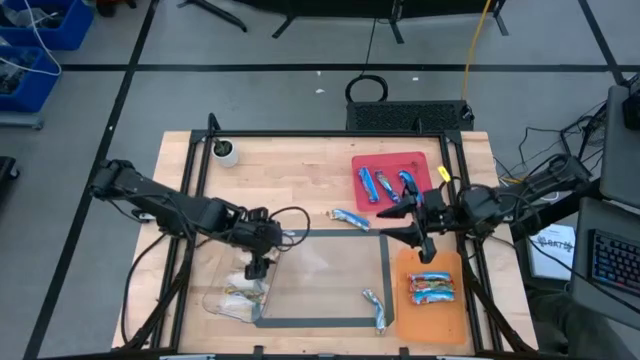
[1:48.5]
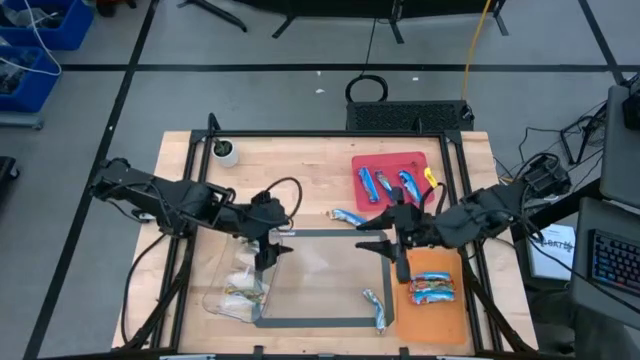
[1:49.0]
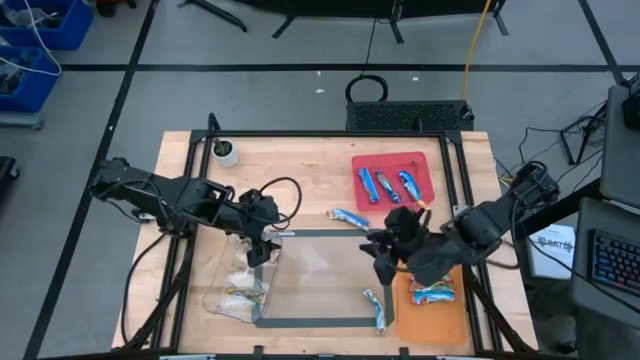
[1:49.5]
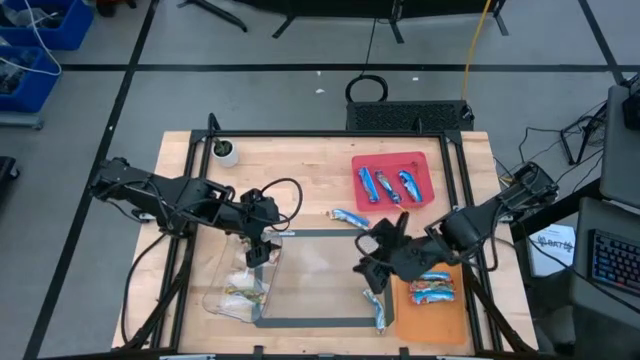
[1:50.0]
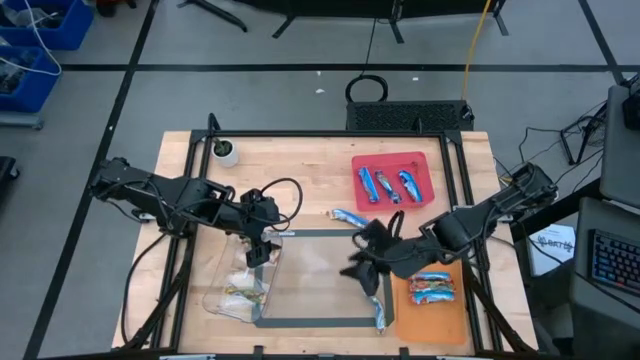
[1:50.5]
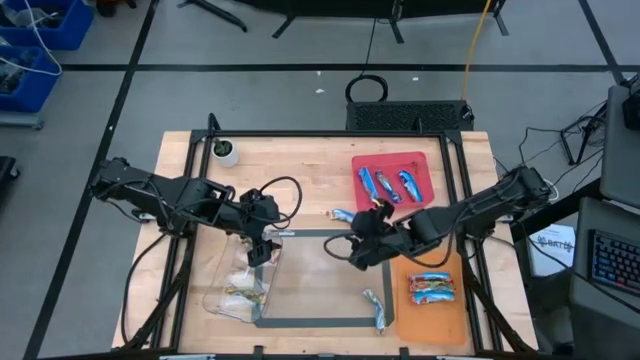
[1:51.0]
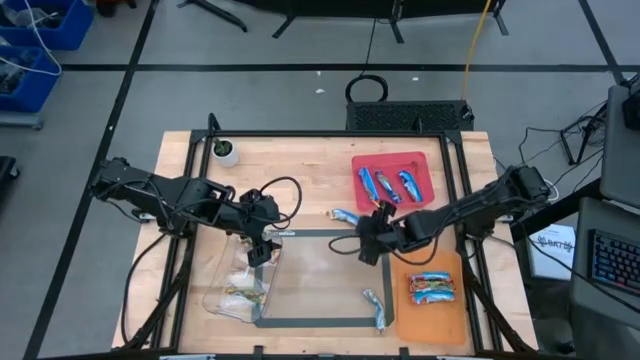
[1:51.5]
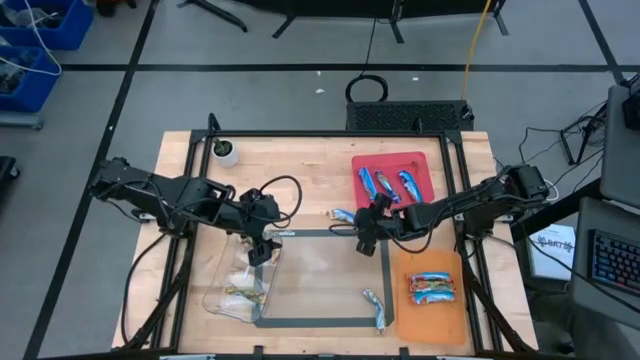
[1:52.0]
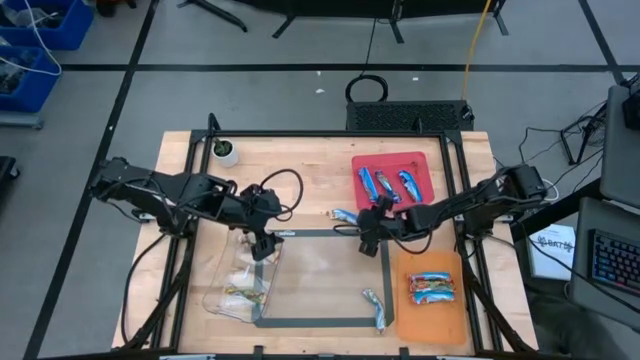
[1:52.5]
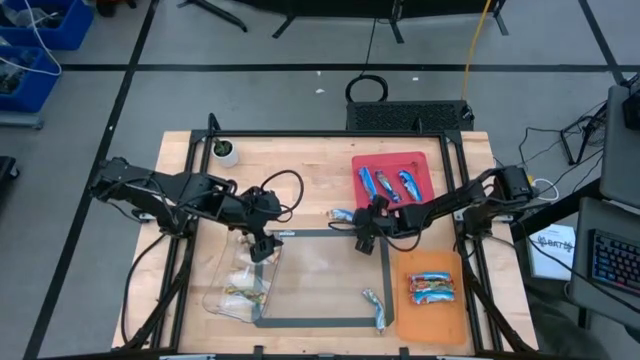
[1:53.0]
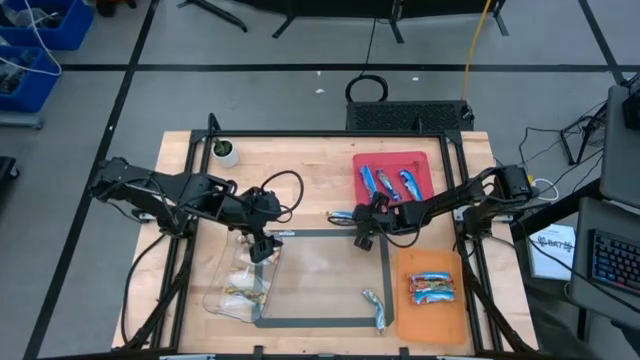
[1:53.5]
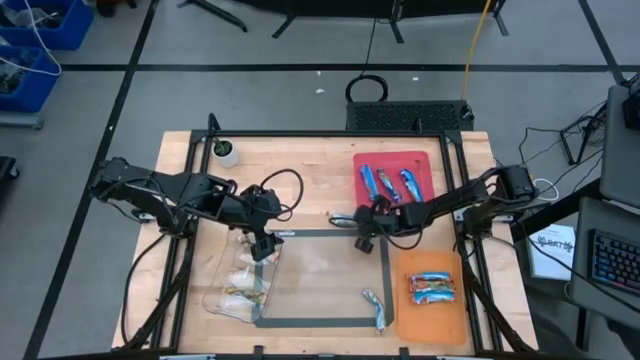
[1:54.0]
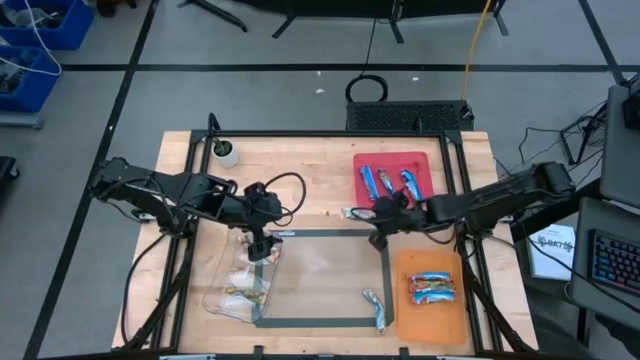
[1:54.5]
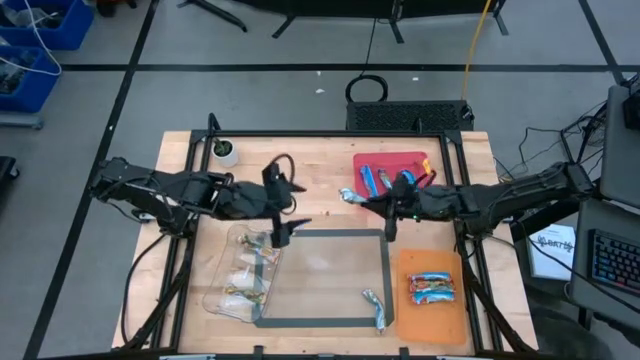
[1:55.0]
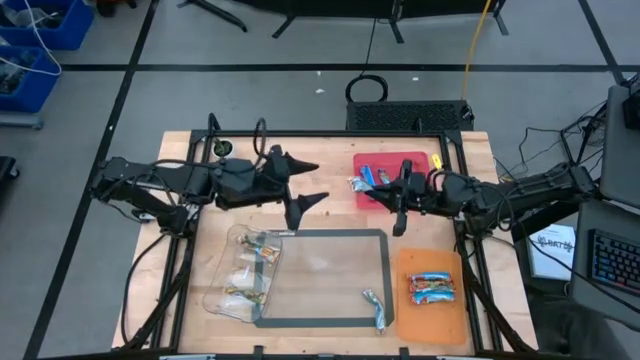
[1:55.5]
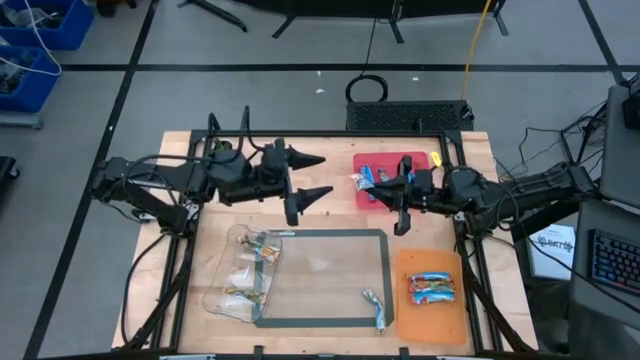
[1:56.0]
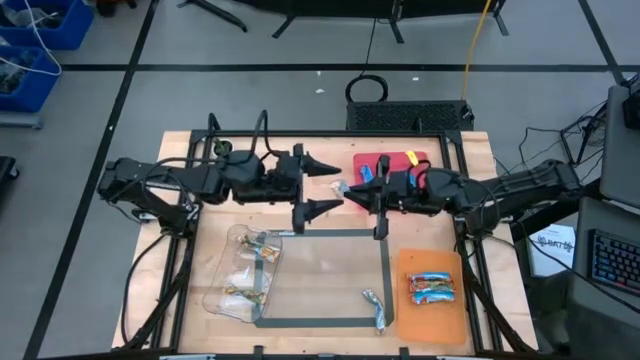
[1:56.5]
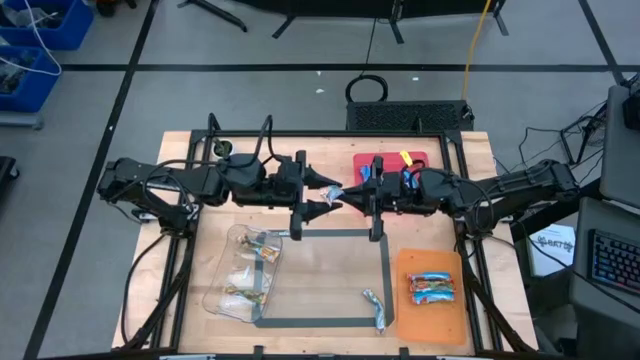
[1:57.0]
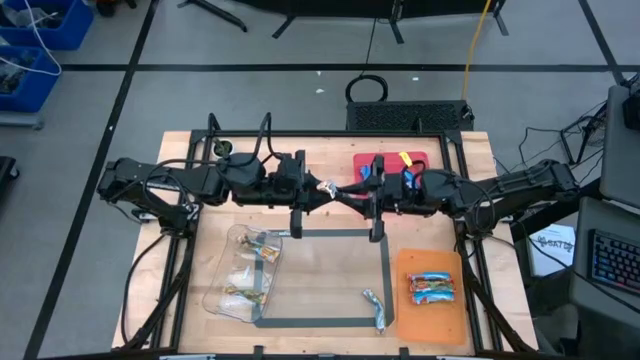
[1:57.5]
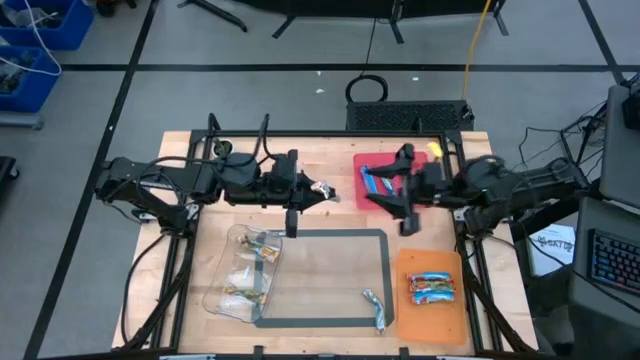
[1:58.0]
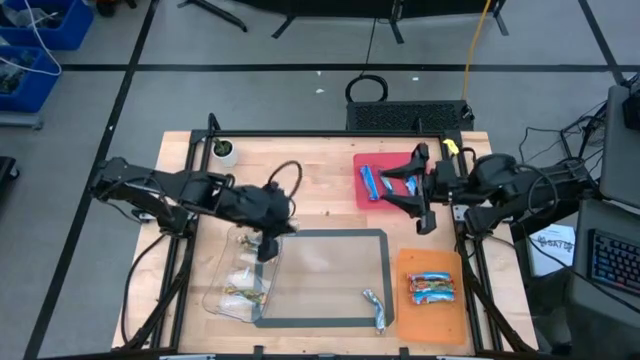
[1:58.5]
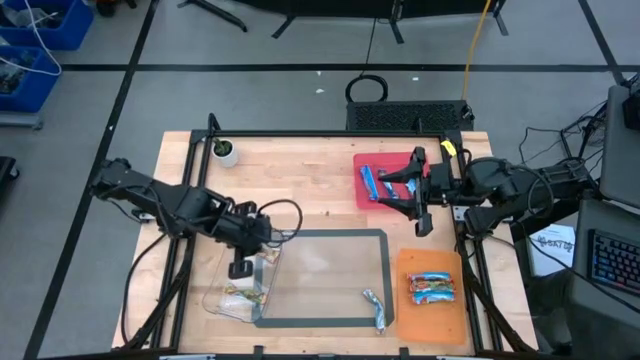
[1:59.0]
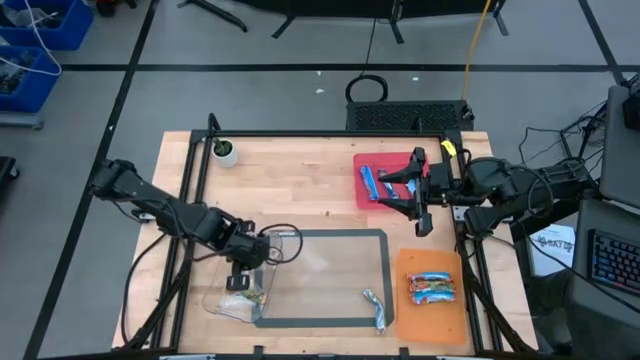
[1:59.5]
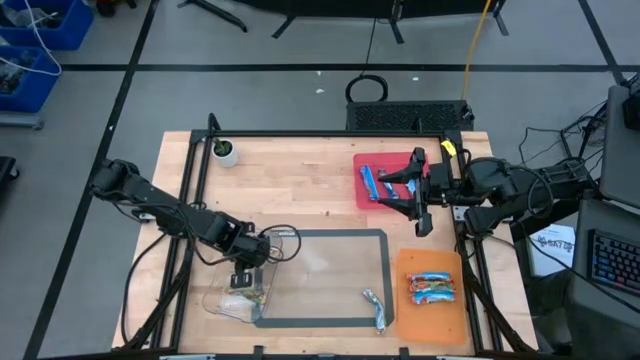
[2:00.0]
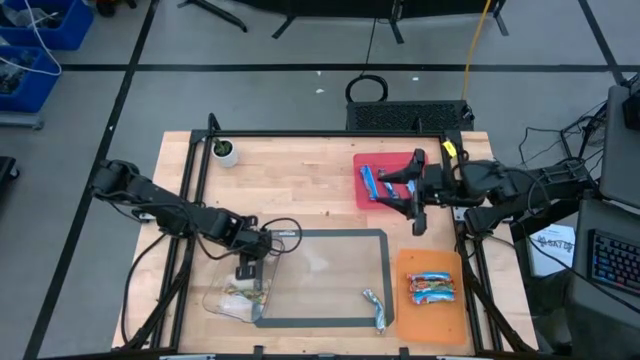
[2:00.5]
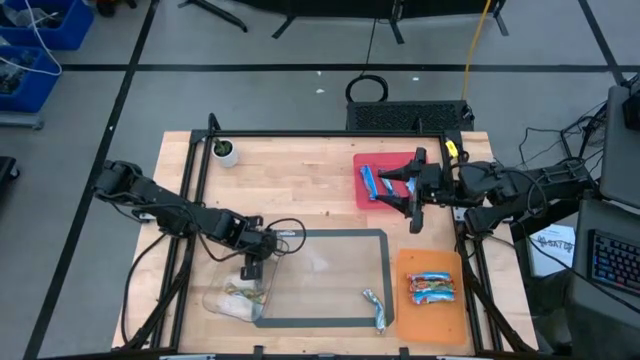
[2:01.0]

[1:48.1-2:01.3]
Task: Pick and place Granola Bars by type
Put the yellow granola bar into the transparent bin

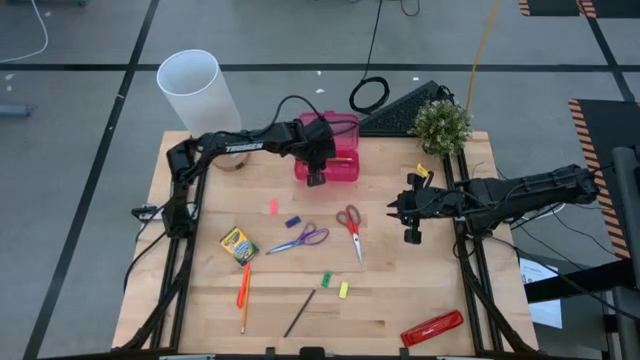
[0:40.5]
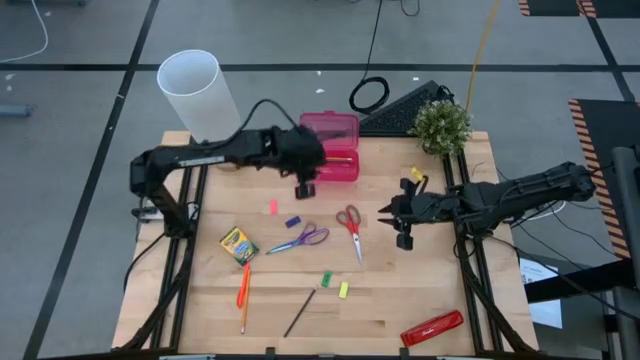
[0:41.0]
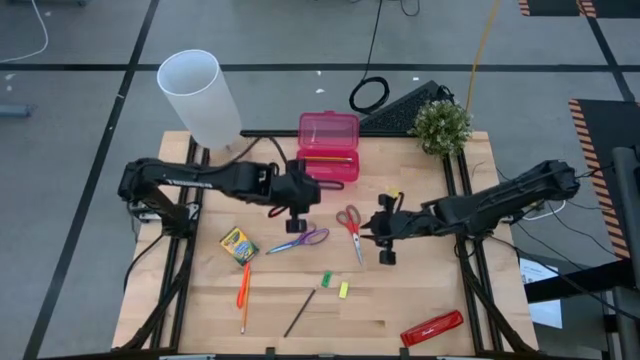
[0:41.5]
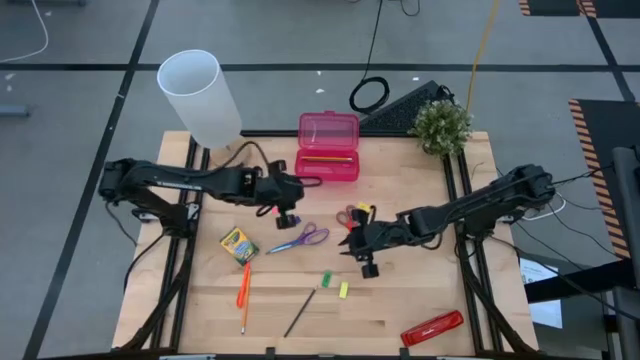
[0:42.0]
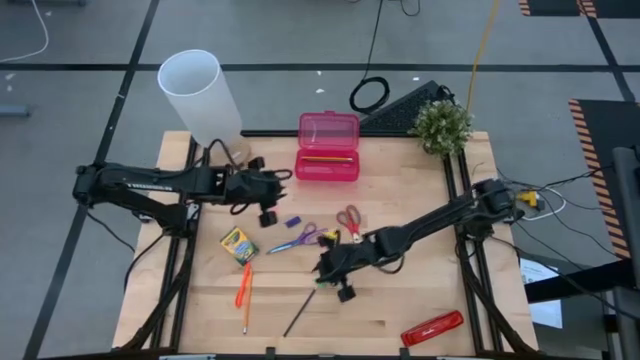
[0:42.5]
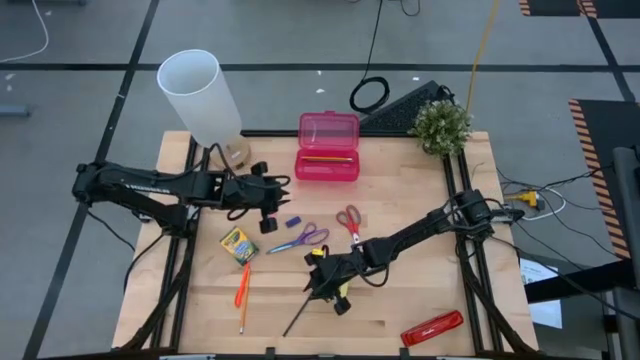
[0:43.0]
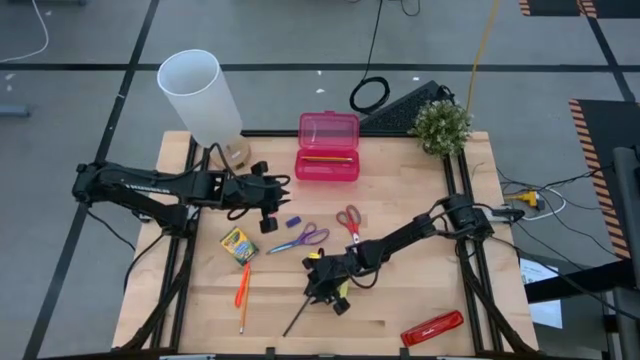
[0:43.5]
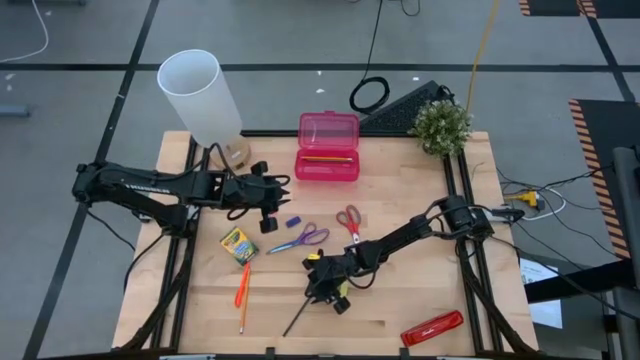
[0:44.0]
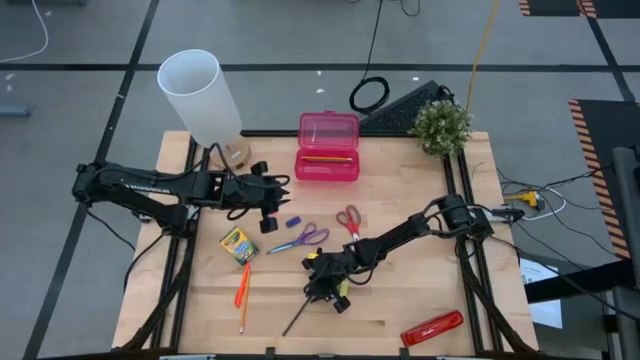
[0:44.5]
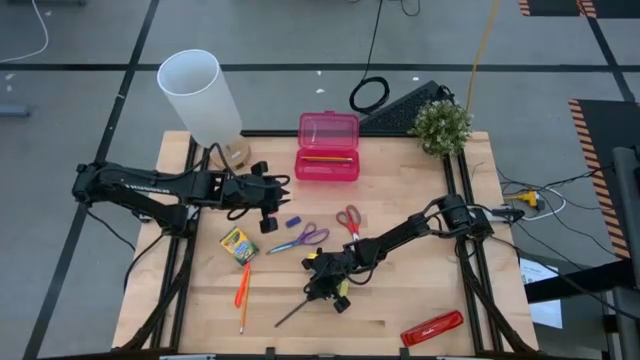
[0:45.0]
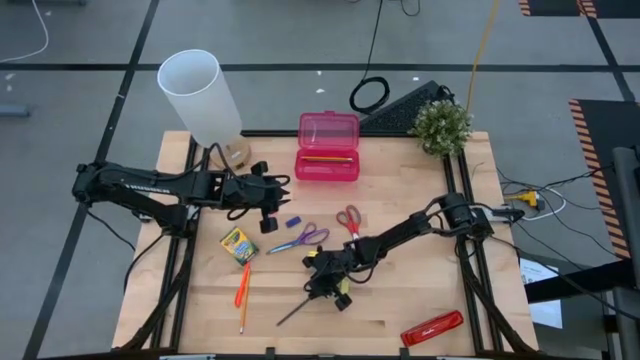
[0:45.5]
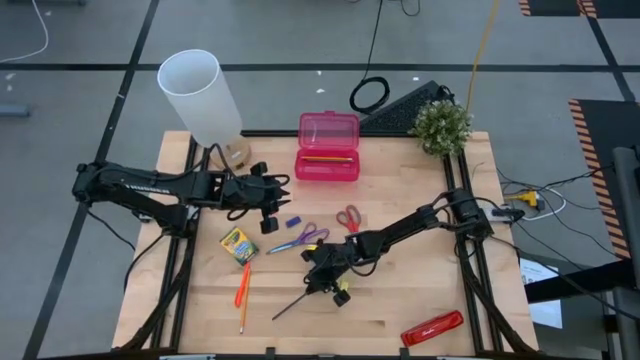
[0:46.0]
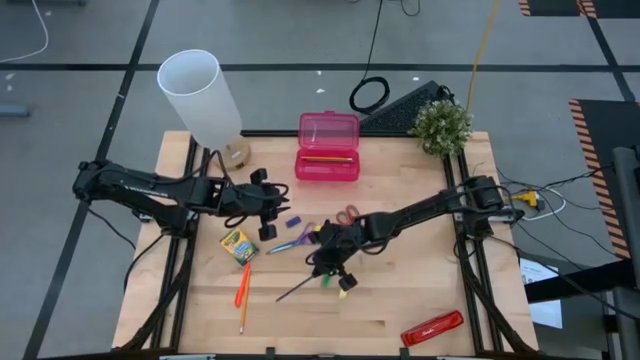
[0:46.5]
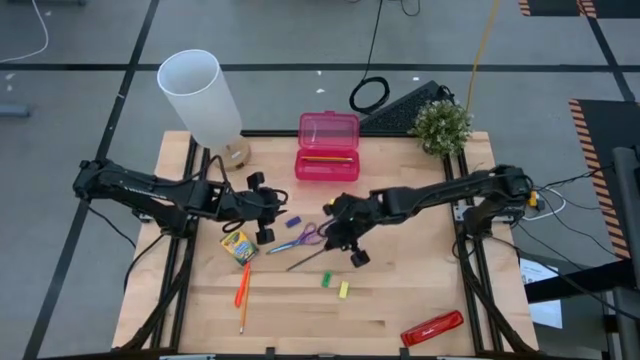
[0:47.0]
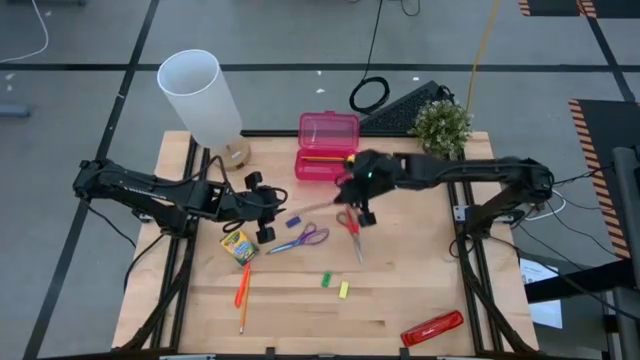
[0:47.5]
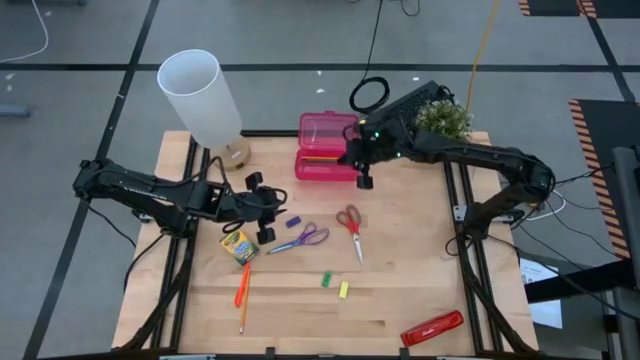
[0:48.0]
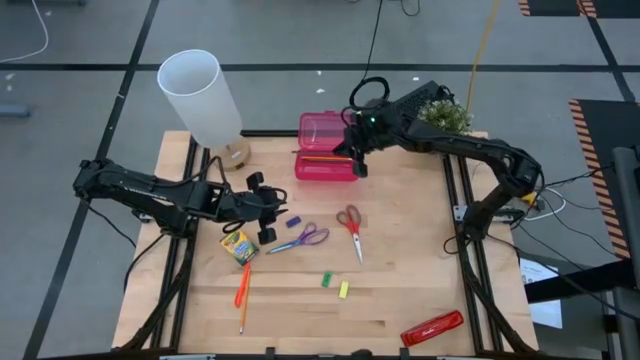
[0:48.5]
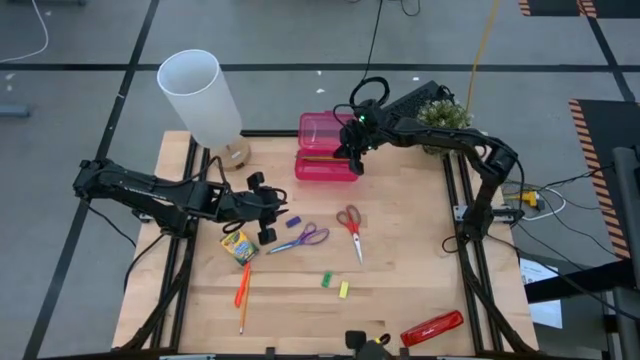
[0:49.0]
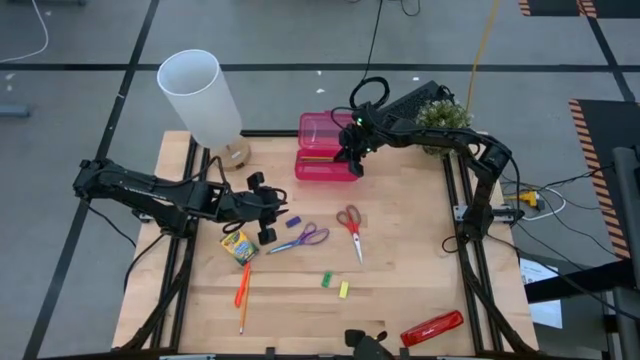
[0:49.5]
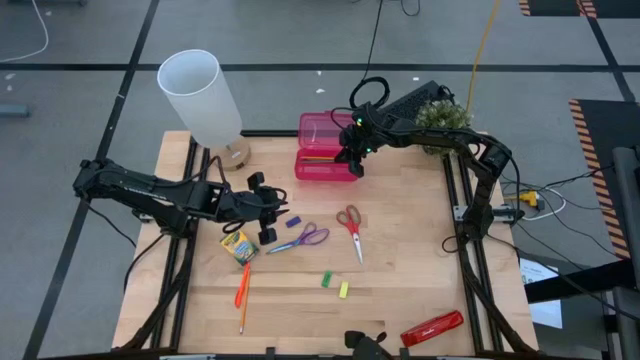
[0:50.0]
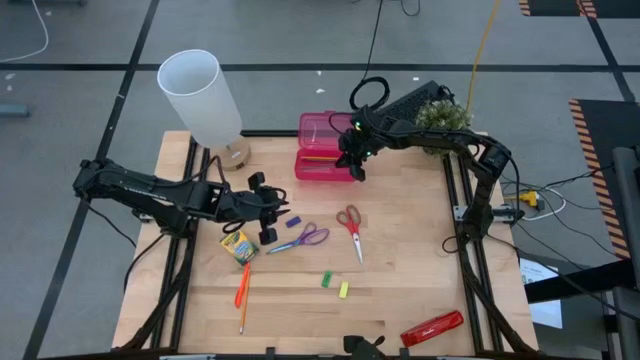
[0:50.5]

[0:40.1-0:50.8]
Task: Pack school essentials
Put the black pencil into the red supply box
